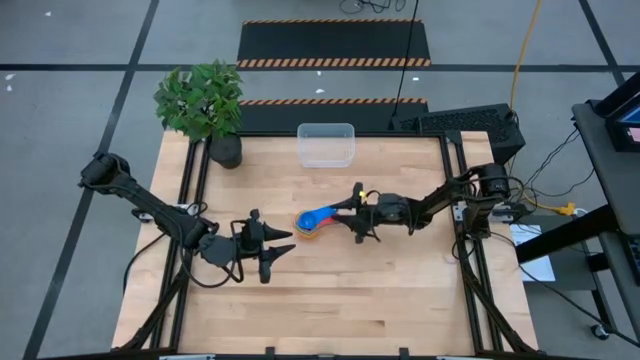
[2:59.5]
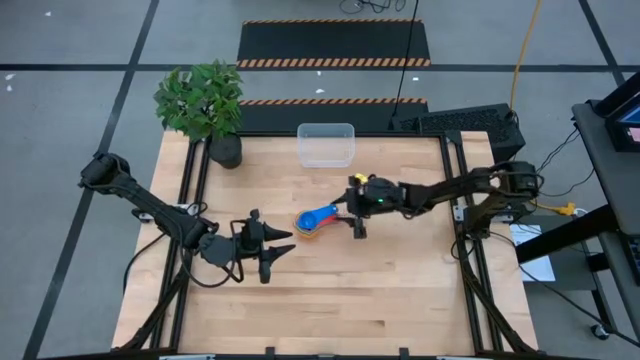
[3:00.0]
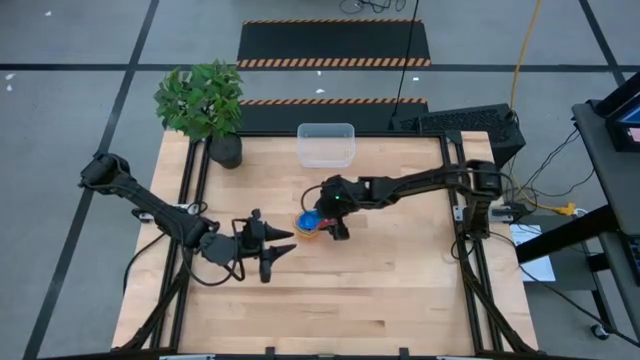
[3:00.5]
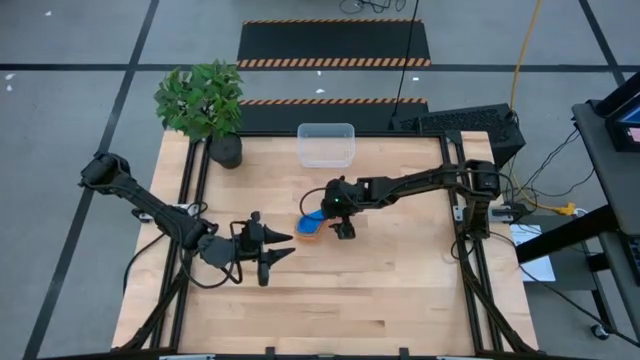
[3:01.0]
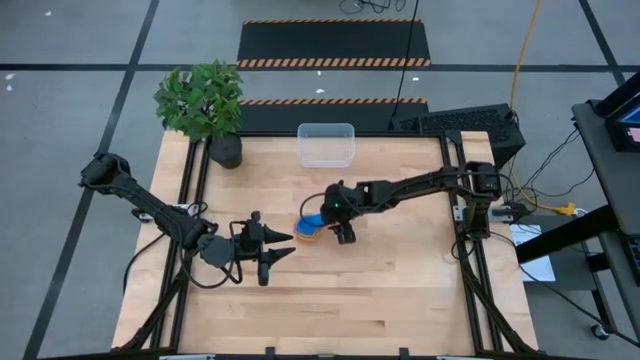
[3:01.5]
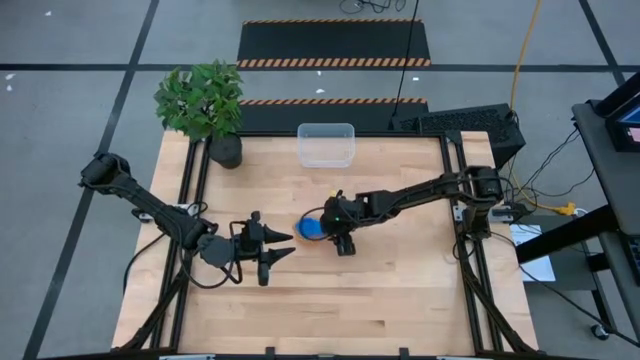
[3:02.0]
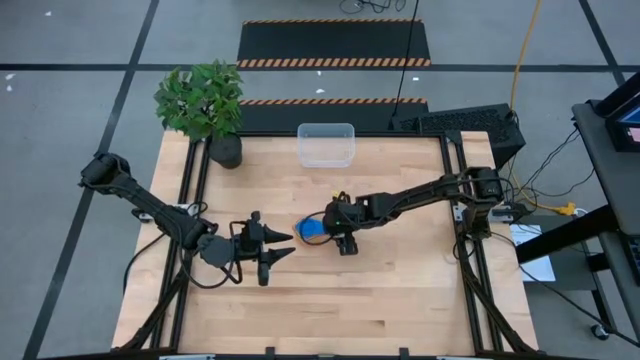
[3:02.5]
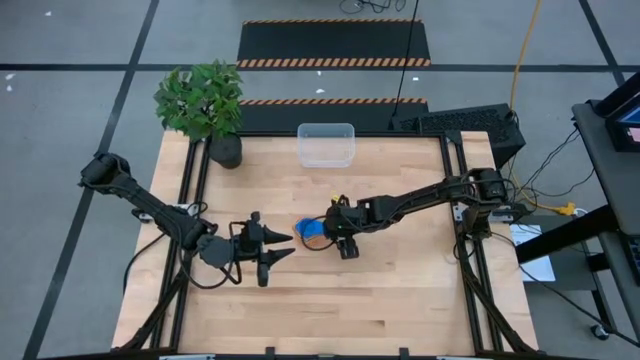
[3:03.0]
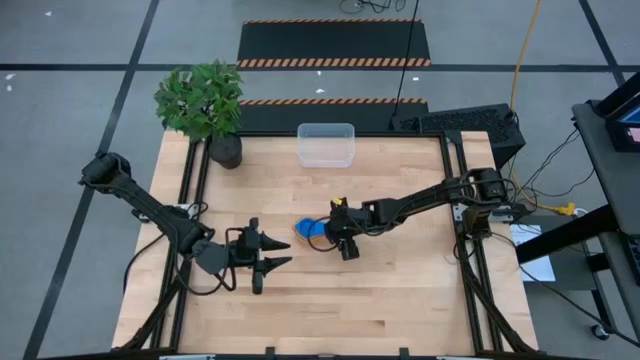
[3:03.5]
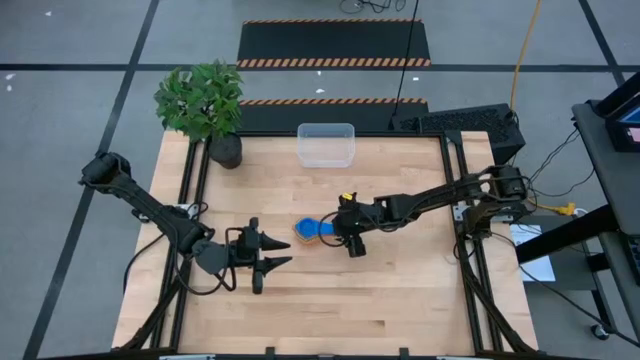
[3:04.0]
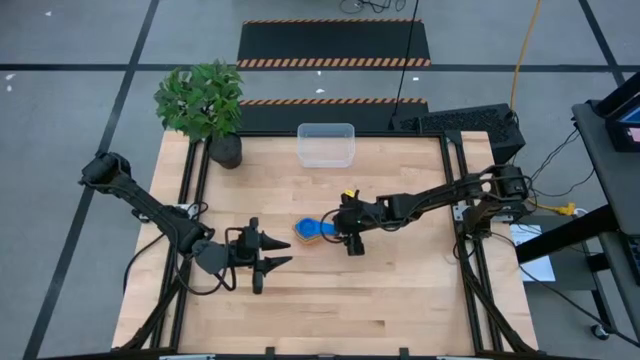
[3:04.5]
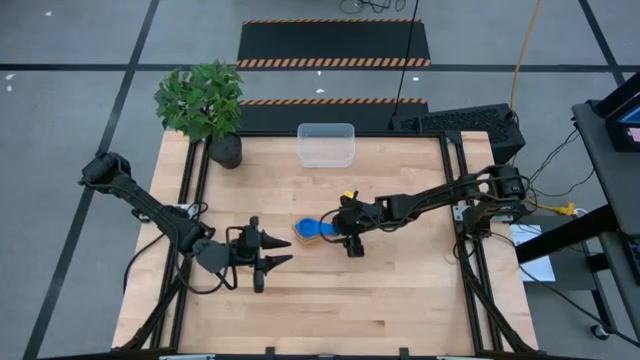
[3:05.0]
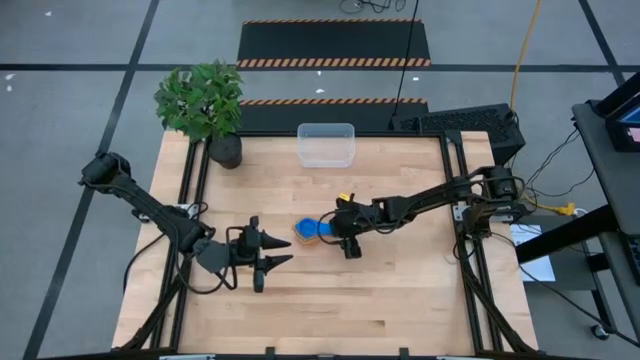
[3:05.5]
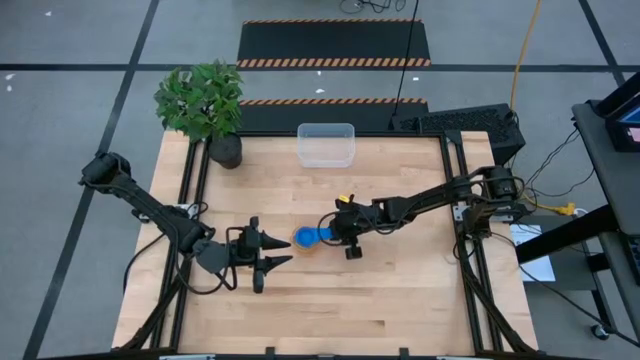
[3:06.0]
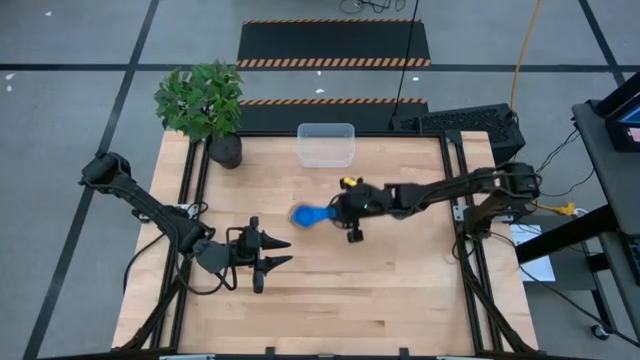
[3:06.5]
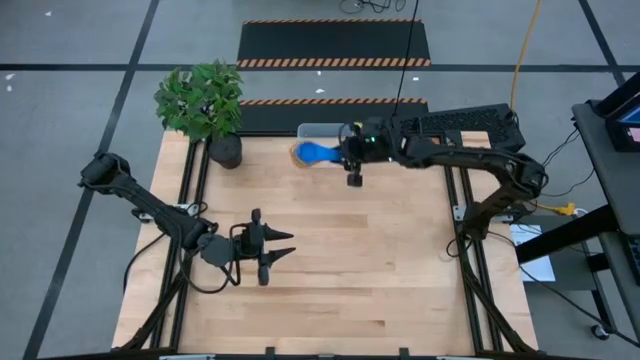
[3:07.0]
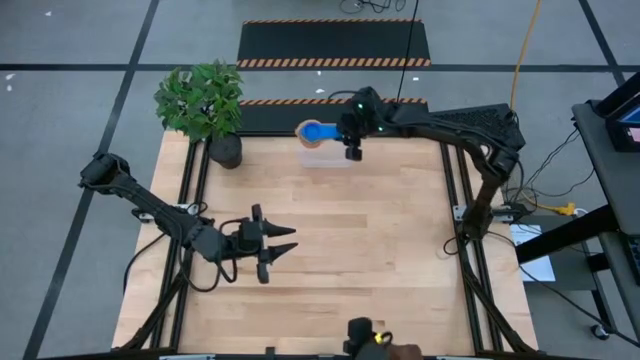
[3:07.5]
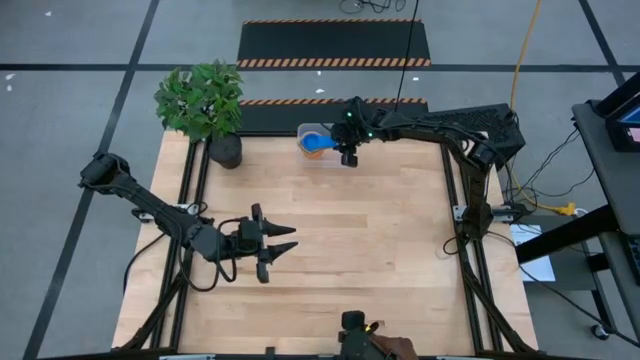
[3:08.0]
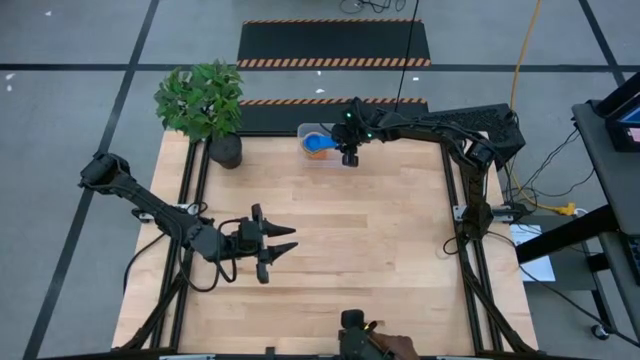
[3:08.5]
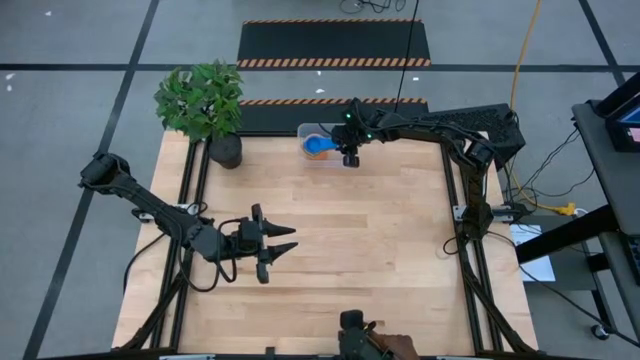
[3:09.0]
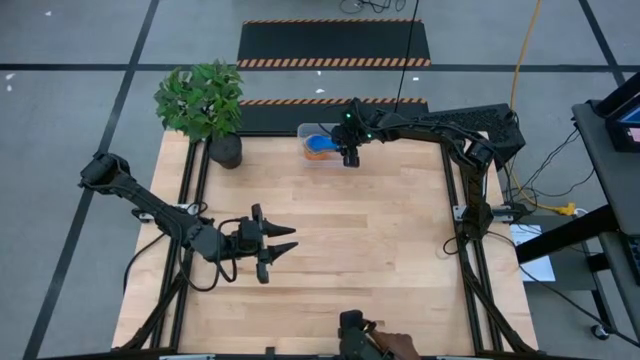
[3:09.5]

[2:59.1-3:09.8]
Task: Nest measuring cups in basket
Put the stacked measuring cups into the transparent bin

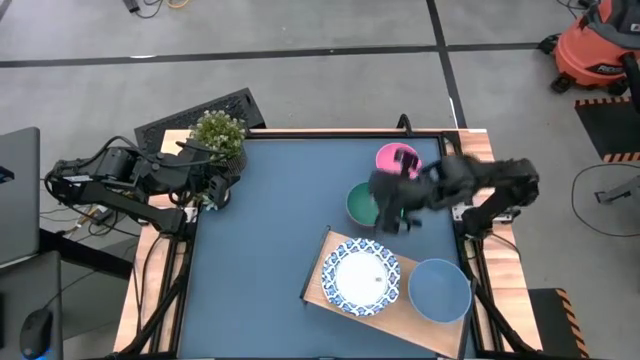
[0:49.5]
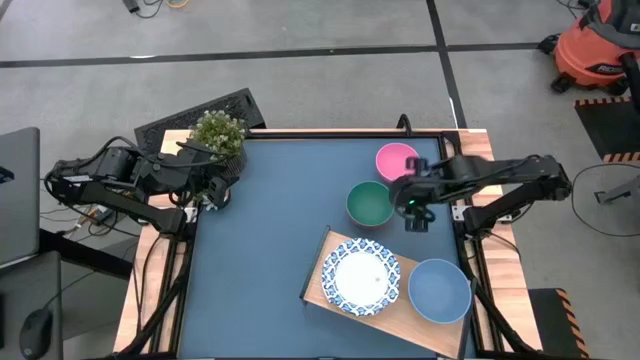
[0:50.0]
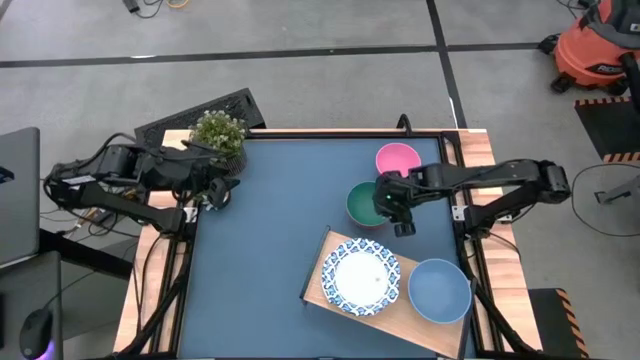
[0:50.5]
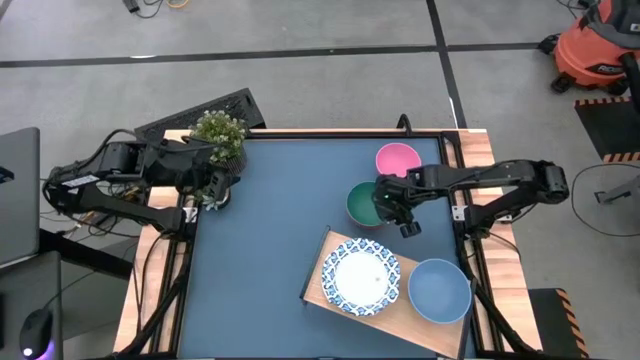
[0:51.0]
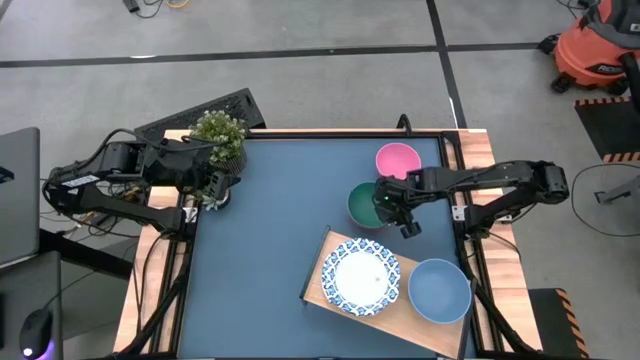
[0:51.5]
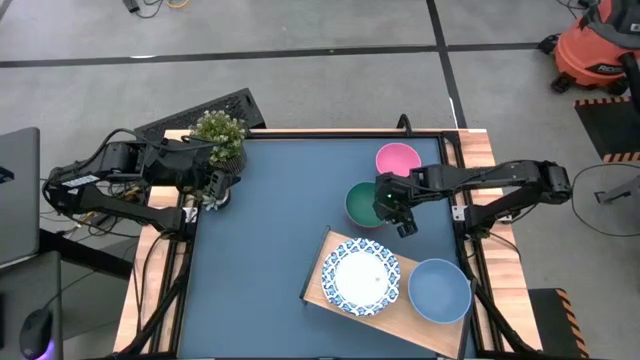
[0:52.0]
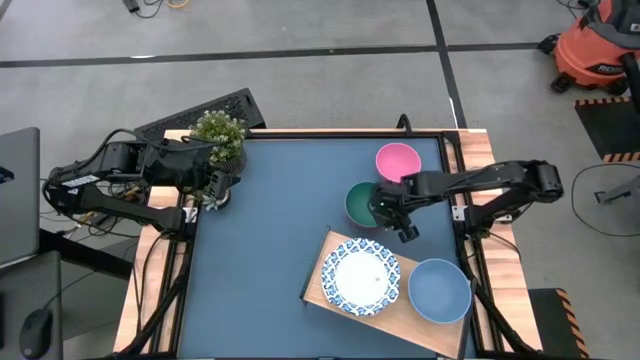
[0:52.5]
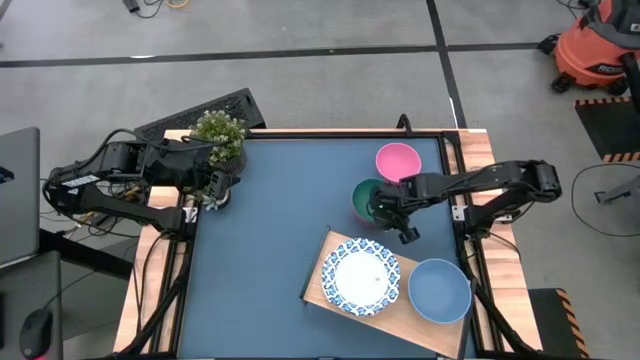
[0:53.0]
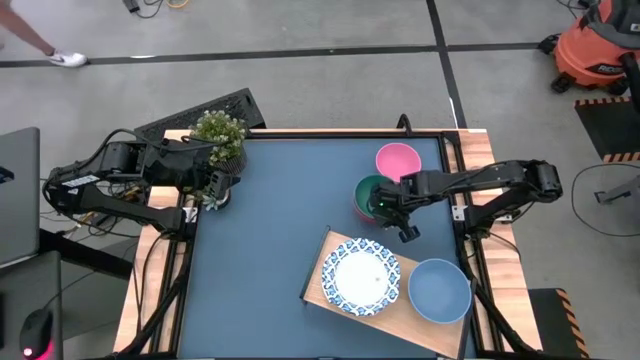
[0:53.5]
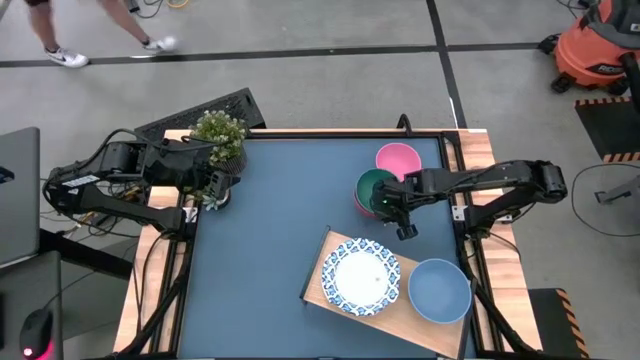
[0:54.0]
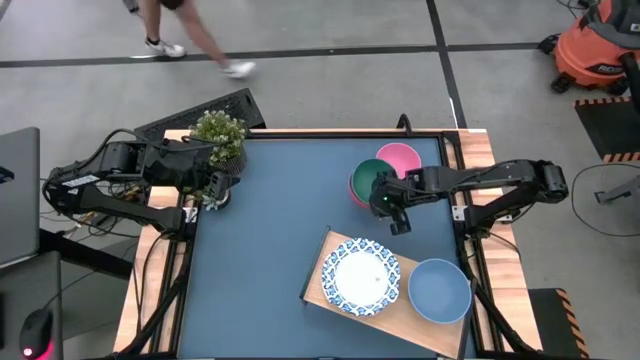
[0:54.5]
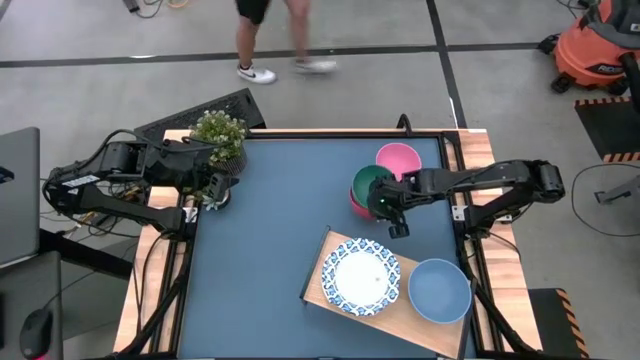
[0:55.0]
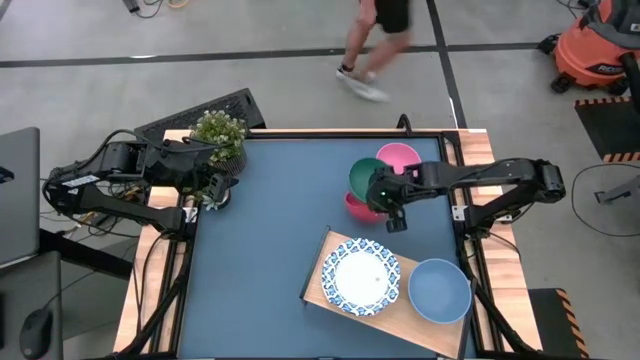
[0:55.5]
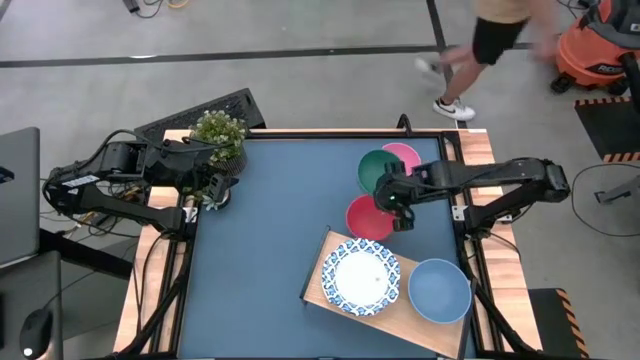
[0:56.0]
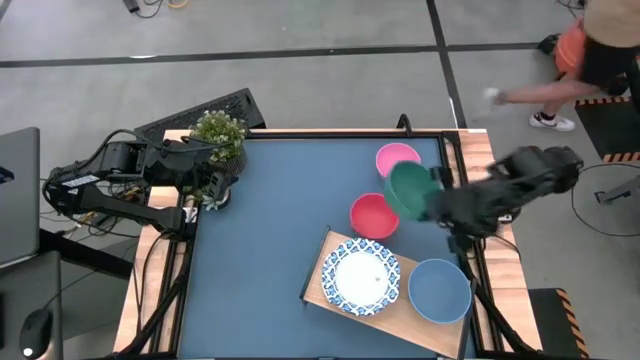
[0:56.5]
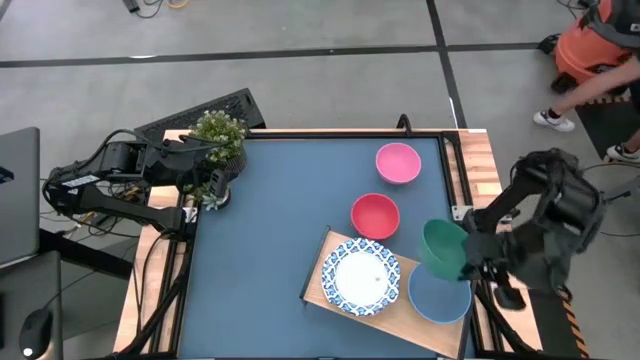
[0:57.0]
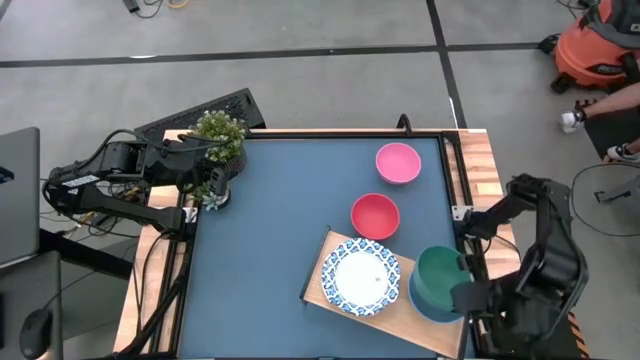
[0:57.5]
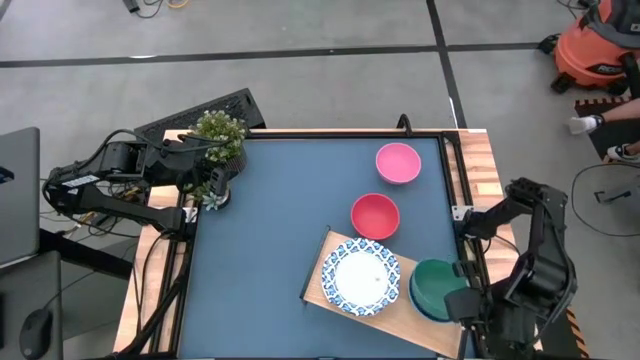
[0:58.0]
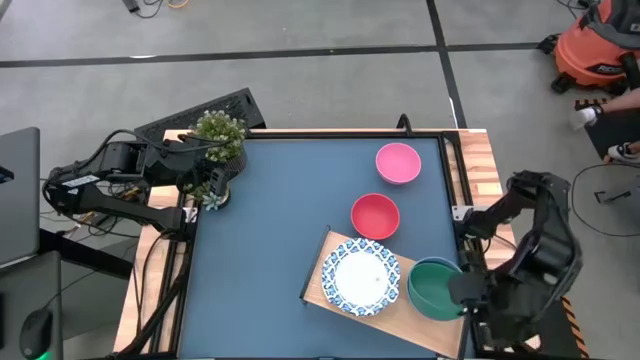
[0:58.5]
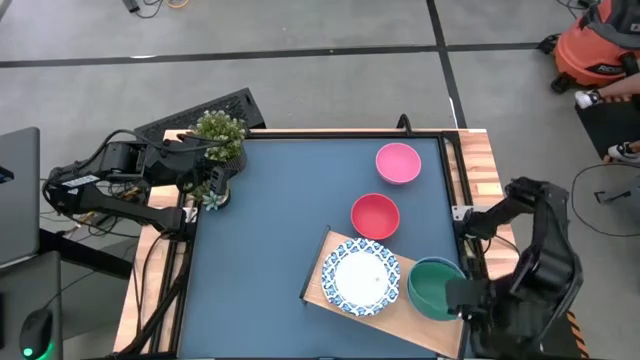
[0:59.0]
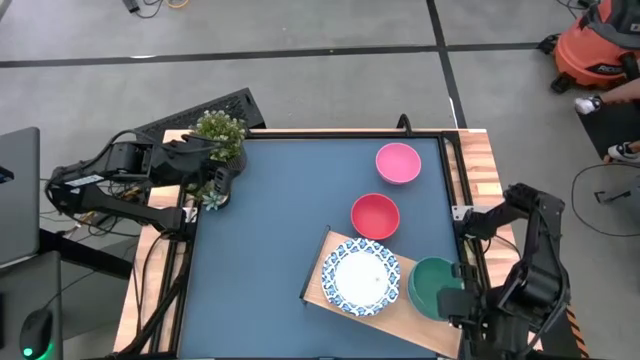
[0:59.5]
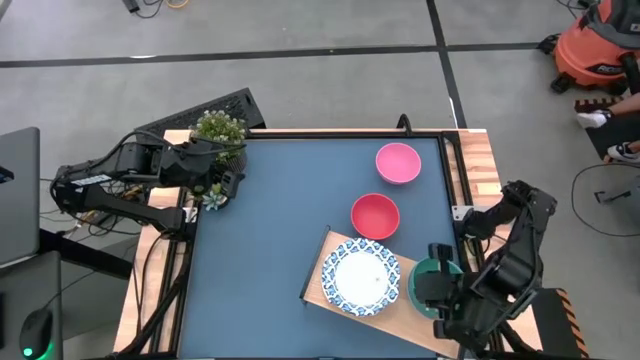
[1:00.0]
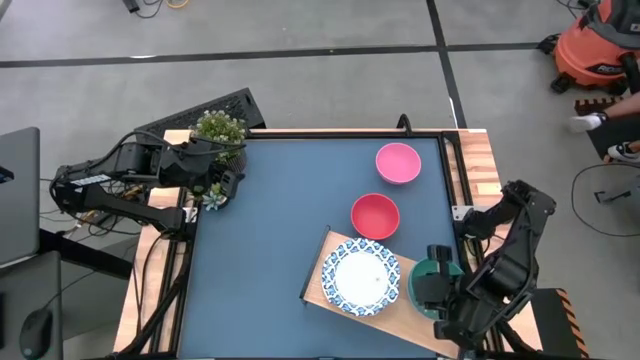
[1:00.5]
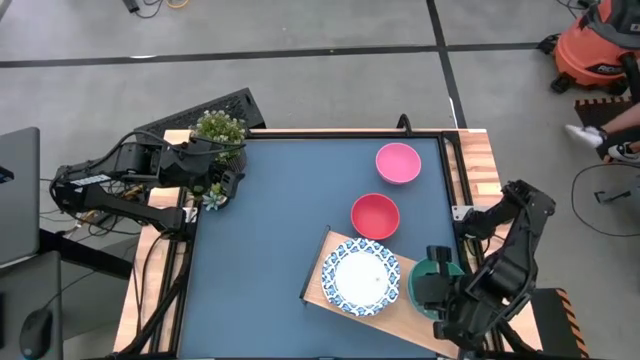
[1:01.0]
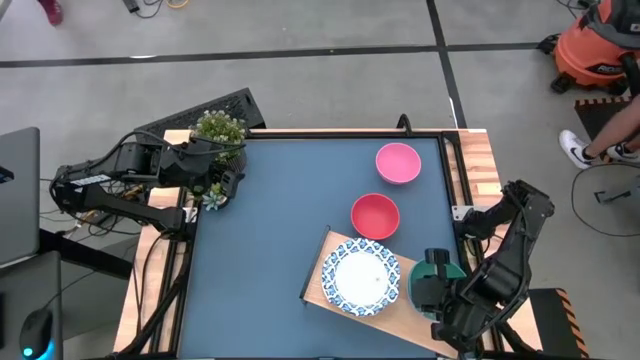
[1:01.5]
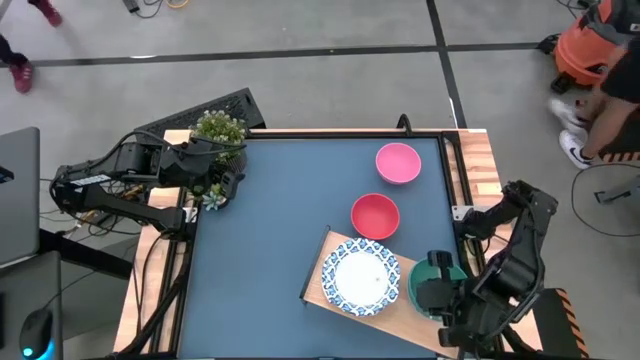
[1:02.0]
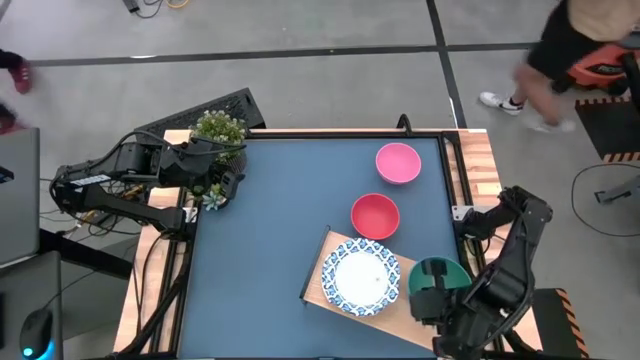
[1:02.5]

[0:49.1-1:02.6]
Task: Place and stack bowls onto a shelf
Stack the green bowl on the top of the blue bowl on the shelf
